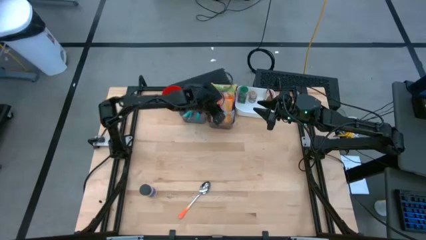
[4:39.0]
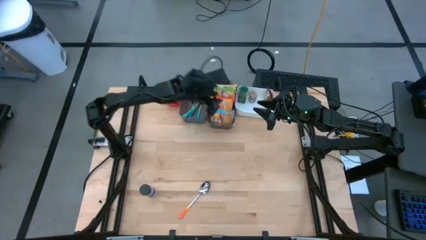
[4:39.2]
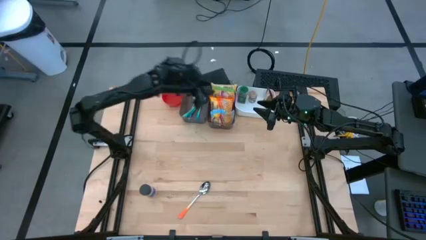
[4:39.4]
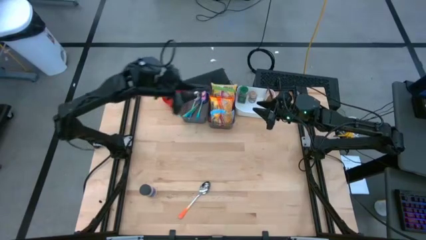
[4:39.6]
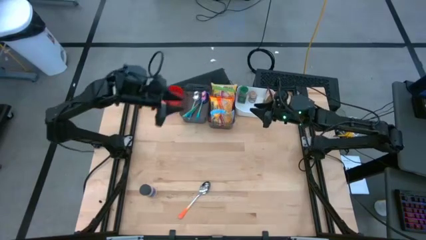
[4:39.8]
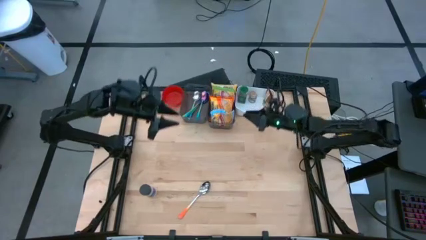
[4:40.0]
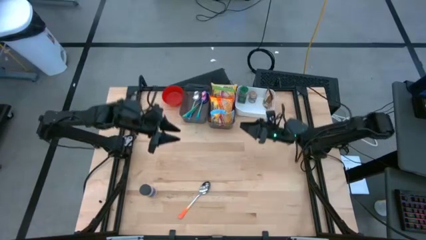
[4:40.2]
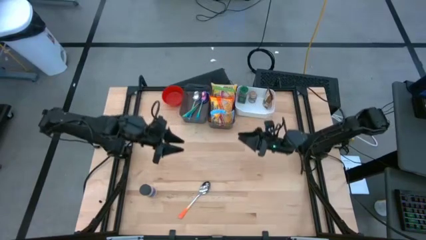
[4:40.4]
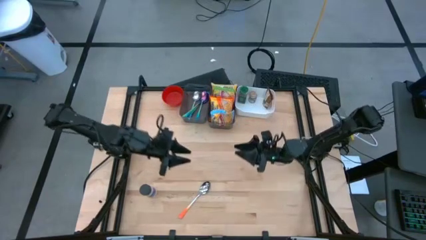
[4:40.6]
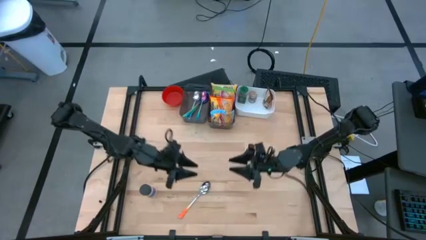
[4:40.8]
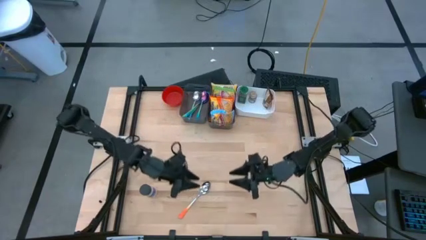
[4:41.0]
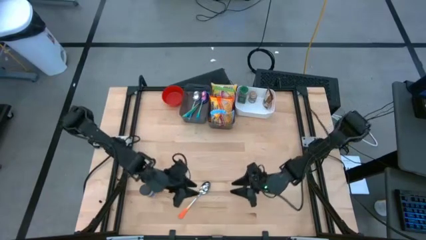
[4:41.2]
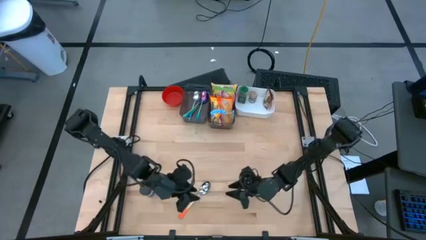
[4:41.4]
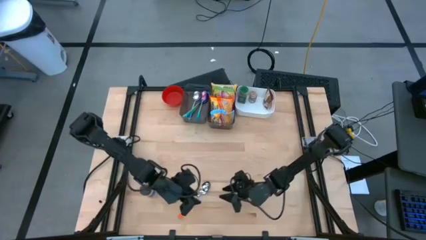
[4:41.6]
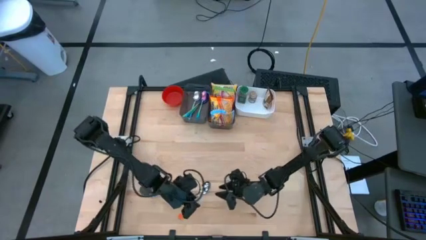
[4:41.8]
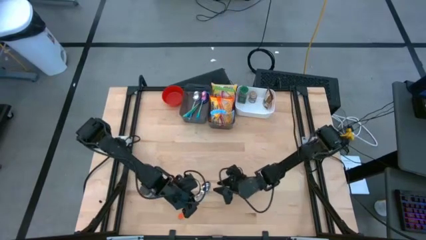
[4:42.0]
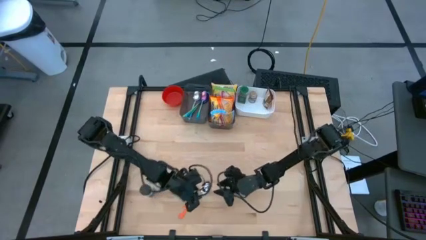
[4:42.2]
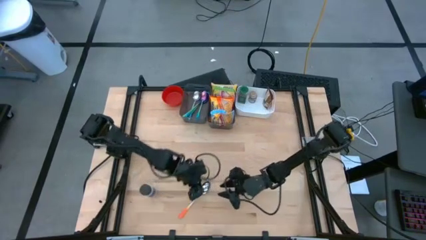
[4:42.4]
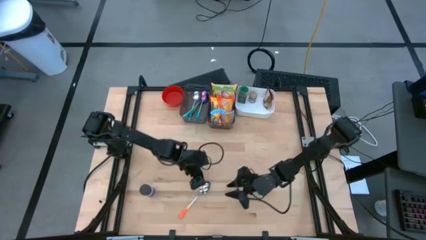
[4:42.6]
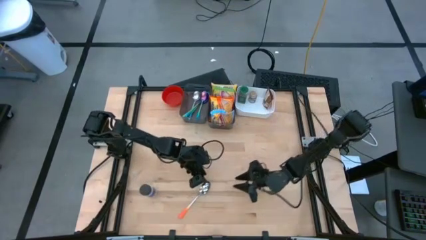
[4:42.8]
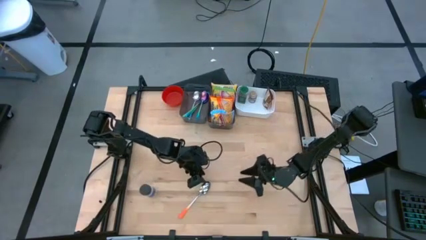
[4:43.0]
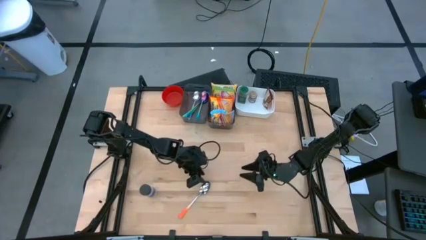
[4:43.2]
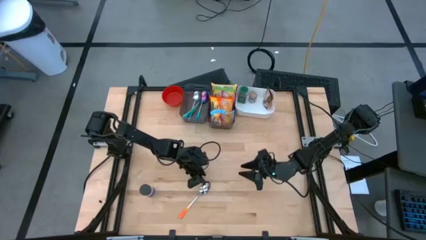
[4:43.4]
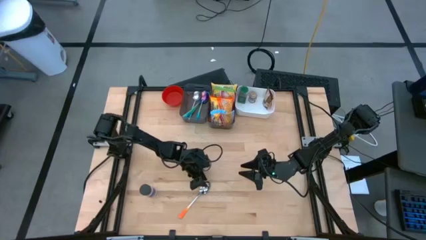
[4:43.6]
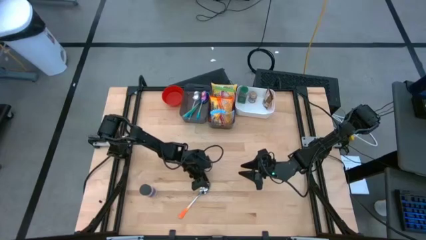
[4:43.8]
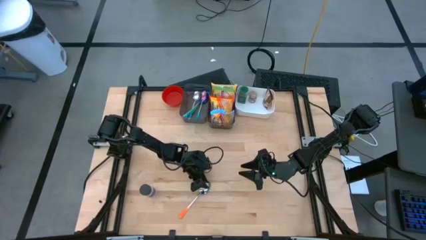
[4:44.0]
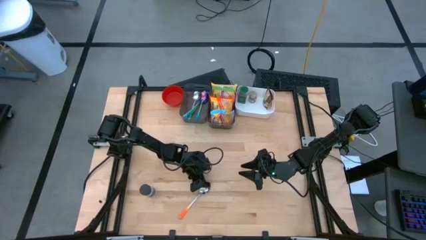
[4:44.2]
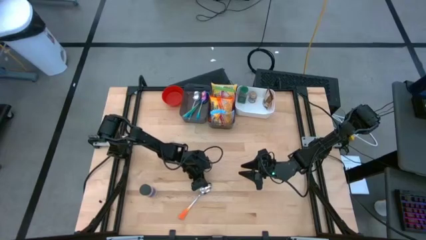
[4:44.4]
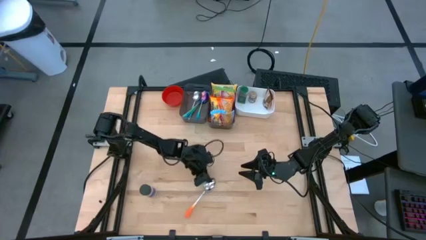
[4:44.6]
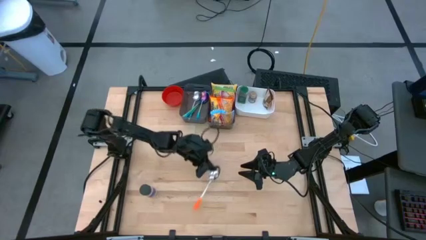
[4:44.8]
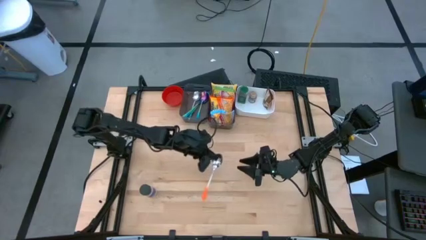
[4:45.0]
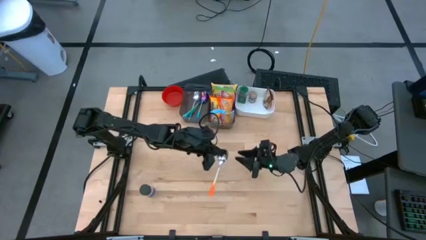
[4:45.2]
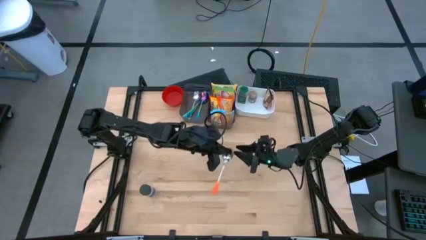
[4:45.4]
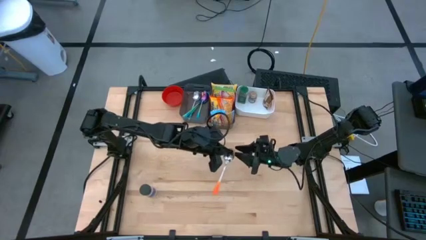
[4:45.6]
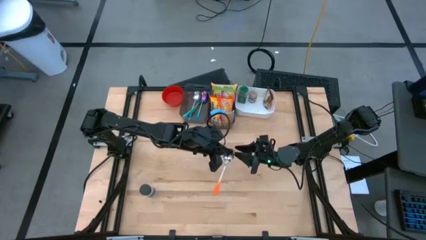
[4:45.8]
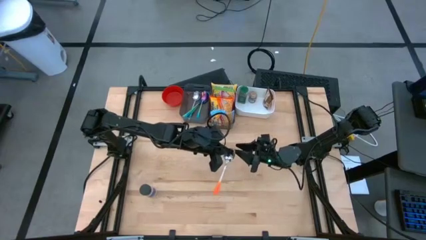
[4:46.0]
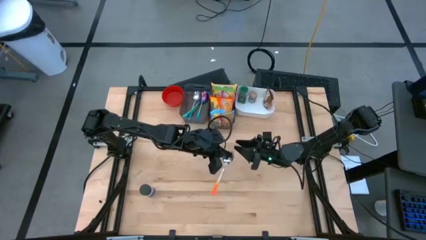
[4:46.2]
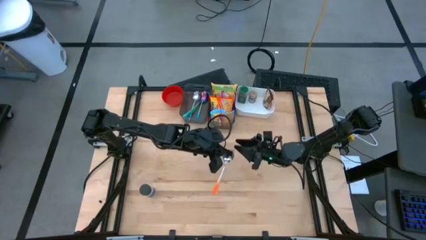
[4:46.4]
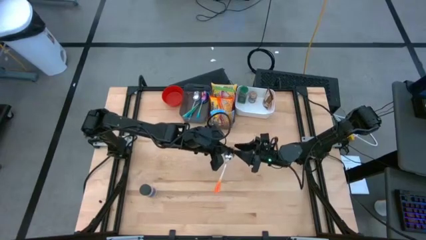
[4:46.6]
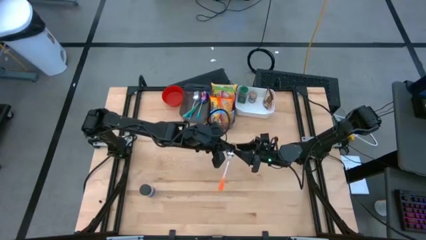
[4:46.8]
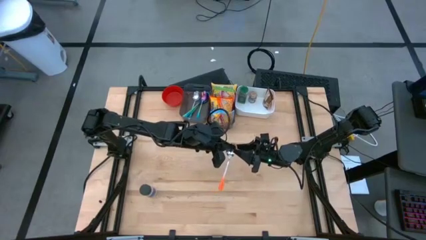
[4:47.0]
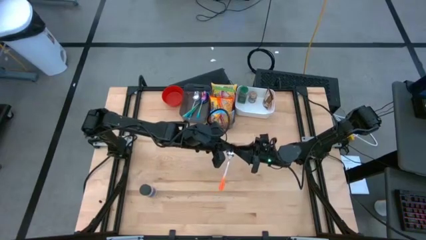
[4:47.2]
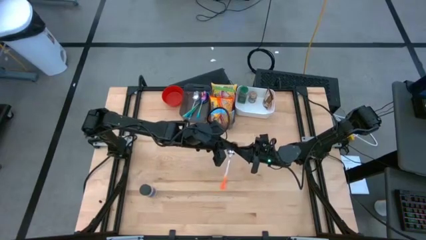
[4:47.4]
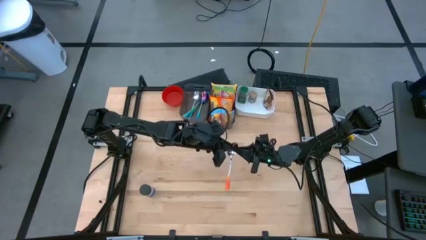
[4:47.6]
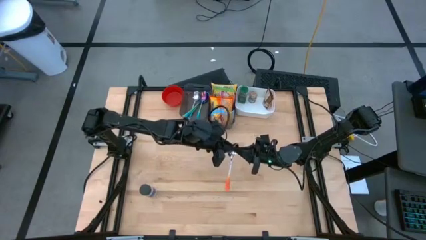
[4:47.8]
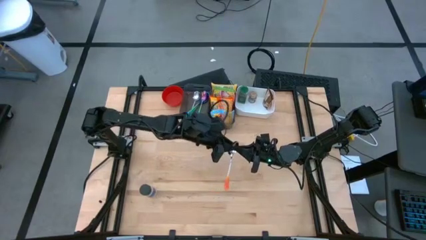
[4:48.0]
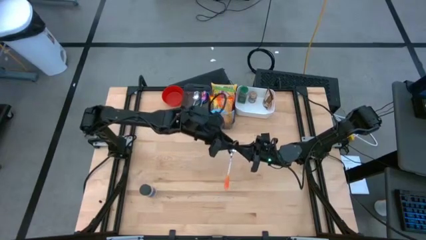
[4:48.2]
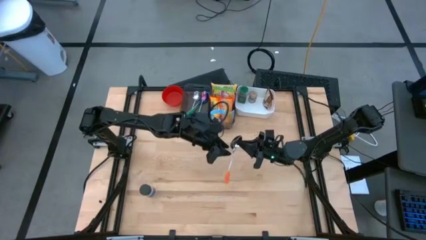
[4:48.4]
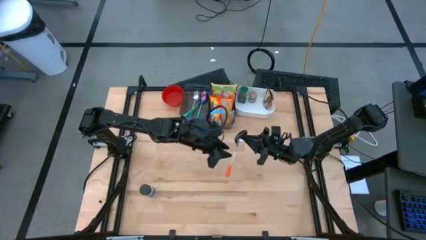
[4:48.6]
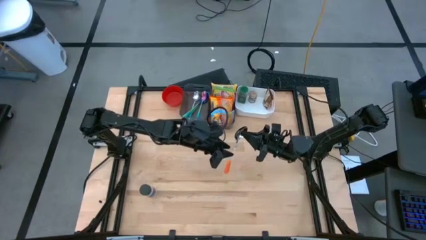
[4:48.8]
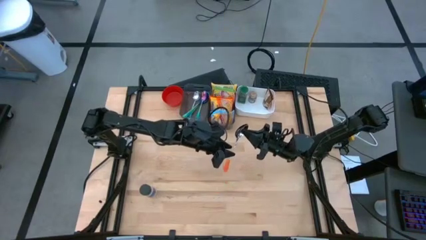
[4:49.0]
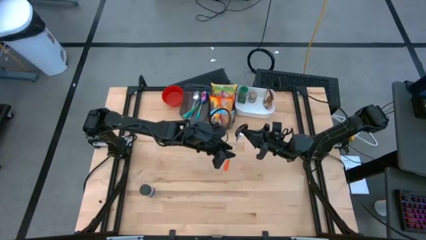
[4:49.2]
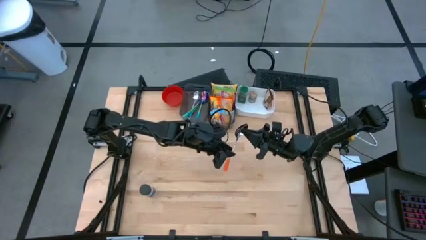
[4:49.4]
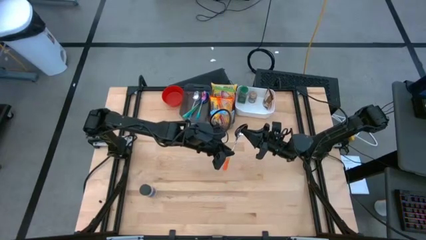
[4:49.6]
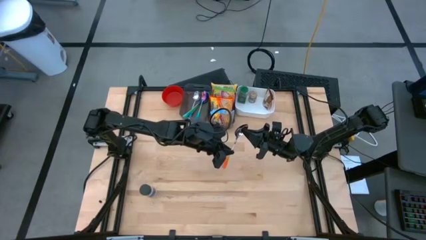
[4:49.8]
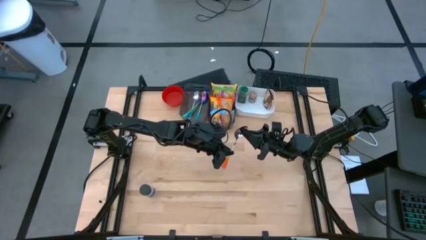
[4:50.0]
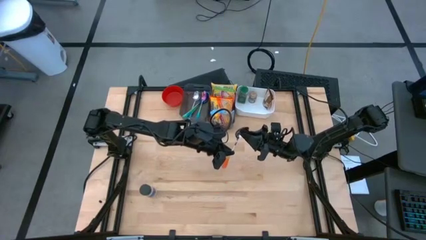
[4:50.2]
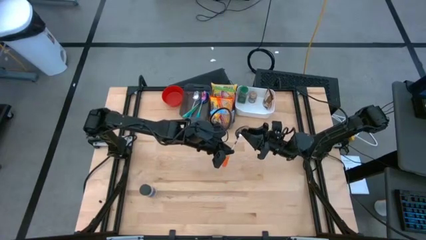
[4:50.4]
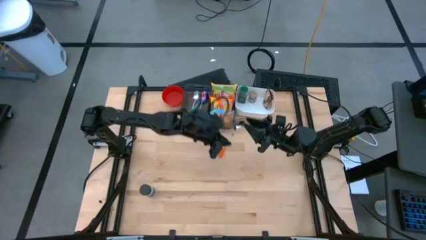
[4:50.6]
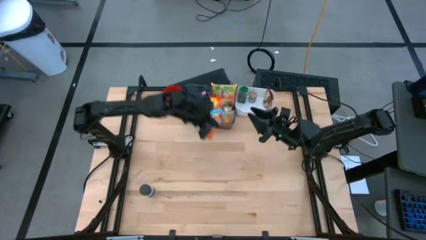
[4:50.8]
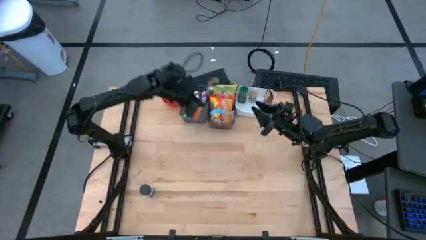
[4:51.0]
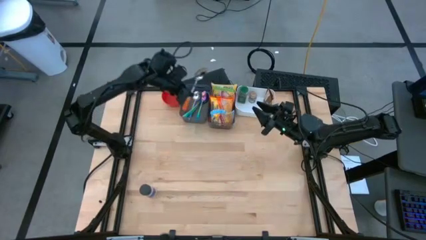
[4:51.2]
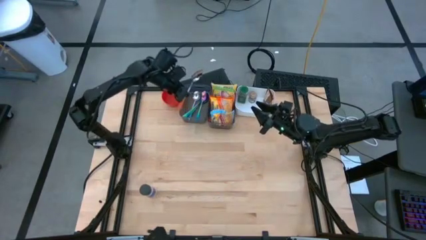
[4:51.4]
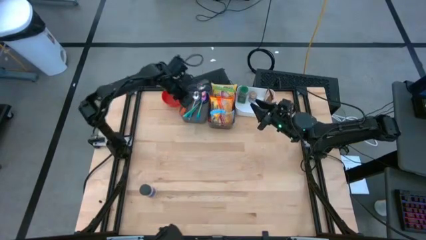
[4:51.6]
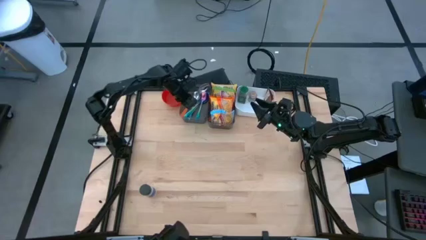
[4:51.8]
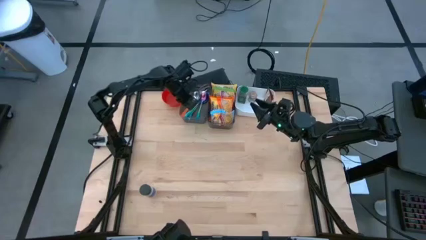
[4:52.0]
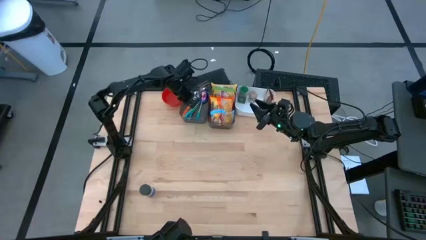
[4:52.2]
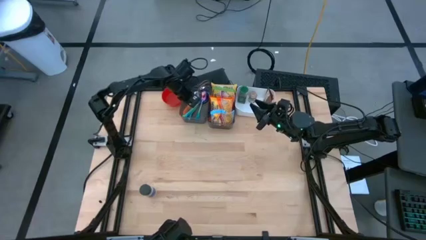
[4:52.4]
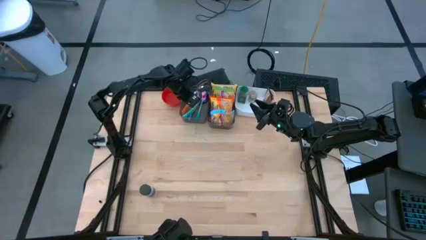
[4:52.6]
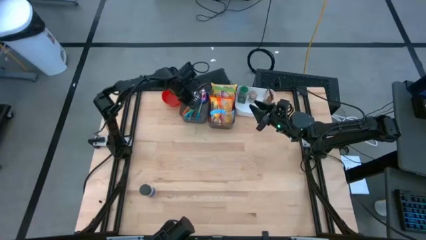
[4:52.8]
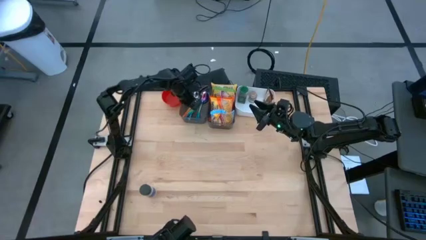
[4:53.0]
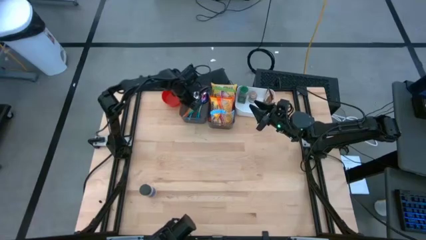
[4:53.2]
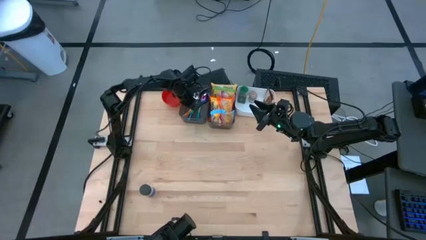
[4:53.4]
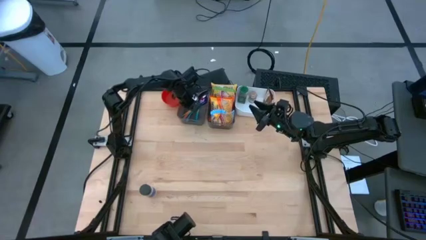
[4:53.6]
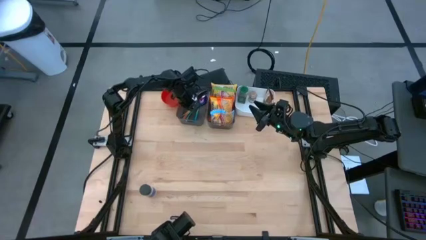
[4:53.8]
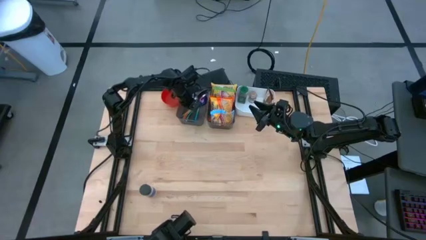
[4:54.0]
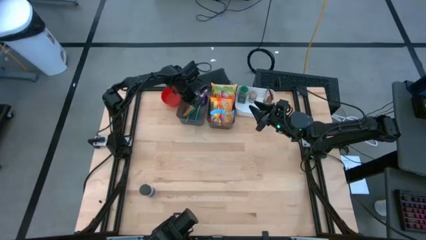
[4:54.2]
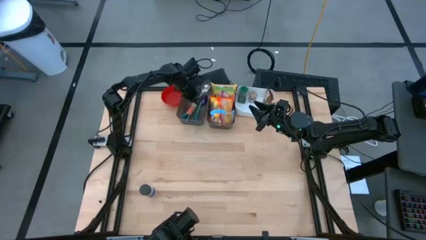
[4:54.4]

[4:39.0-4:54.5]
Task: Pick & Place Food Item
Put the white and orange spoon into the left black bin
